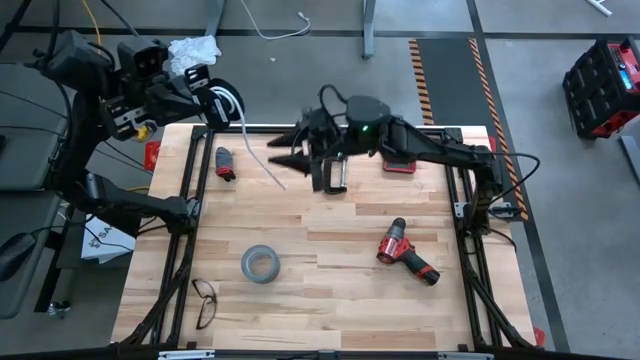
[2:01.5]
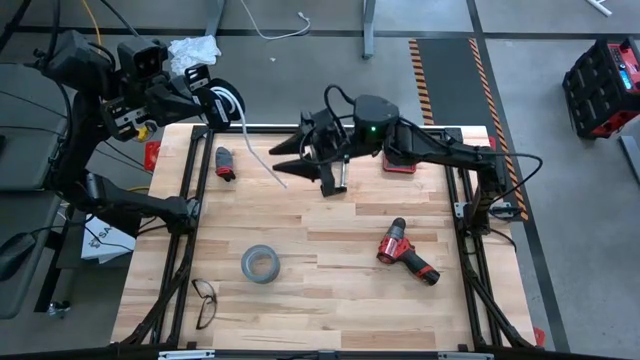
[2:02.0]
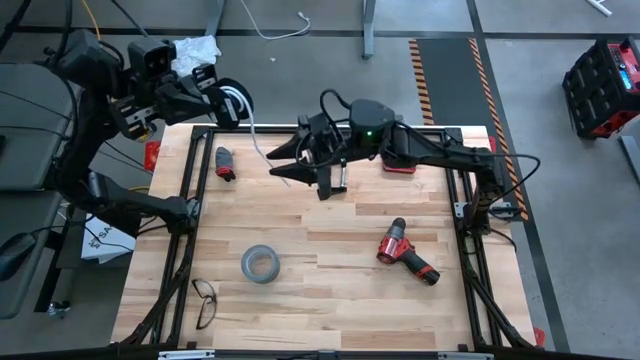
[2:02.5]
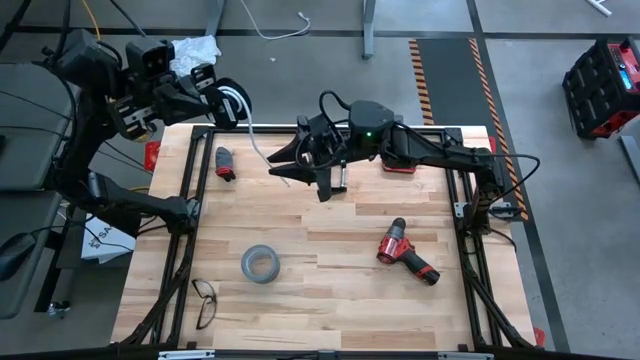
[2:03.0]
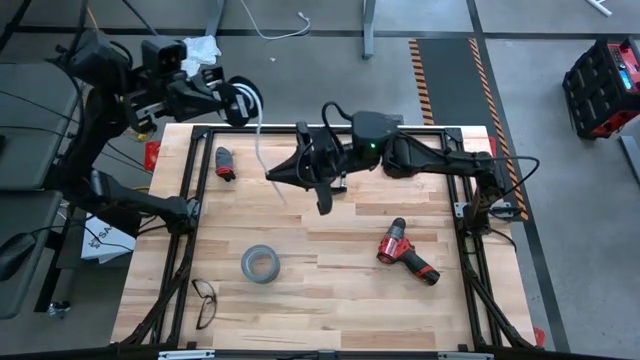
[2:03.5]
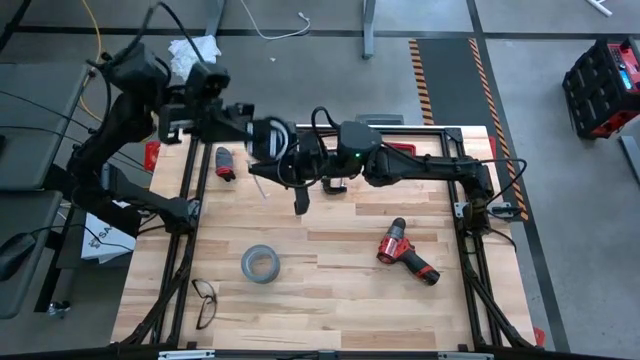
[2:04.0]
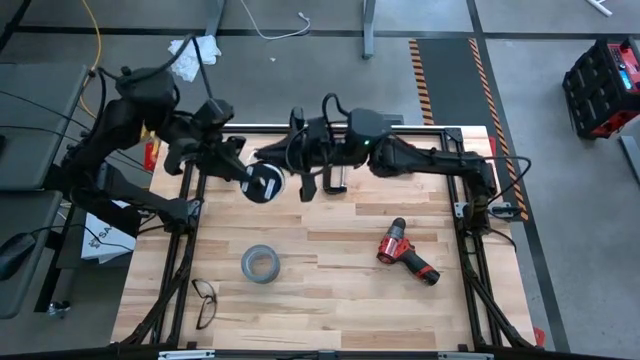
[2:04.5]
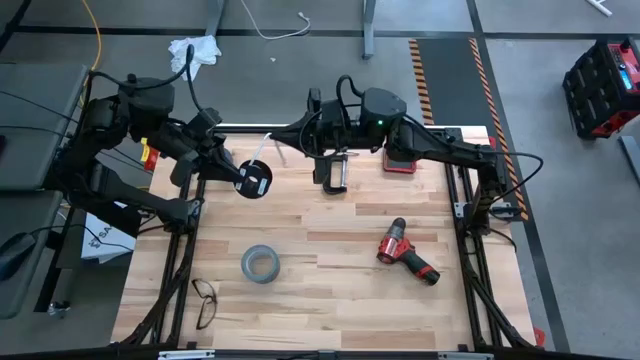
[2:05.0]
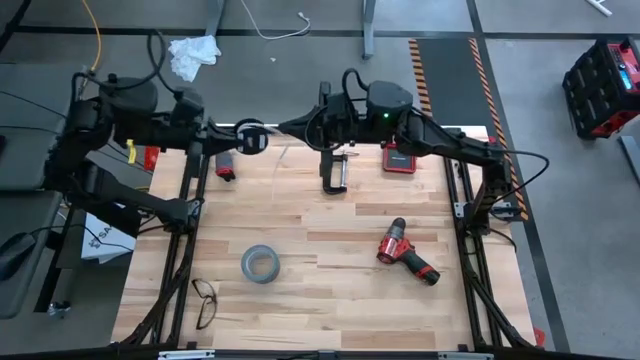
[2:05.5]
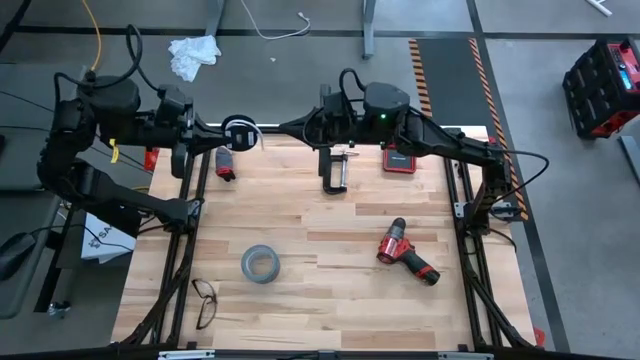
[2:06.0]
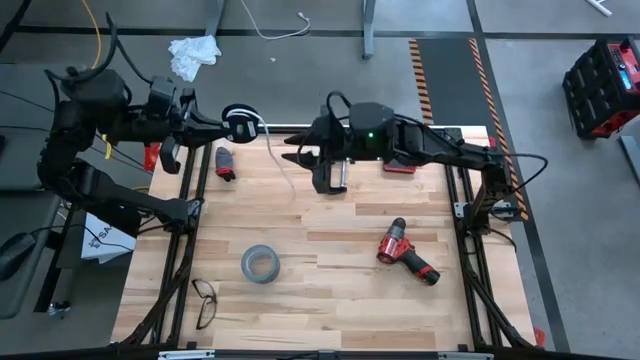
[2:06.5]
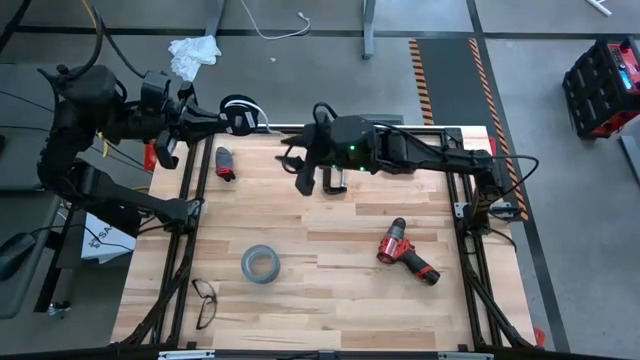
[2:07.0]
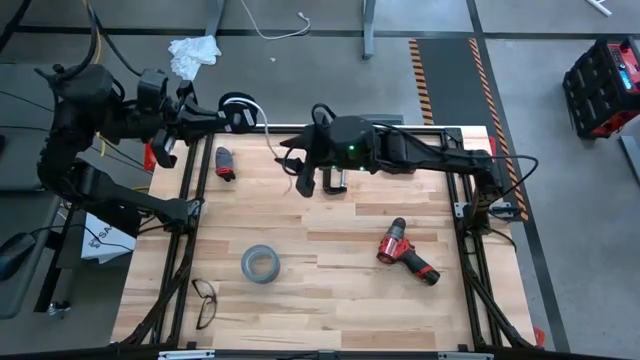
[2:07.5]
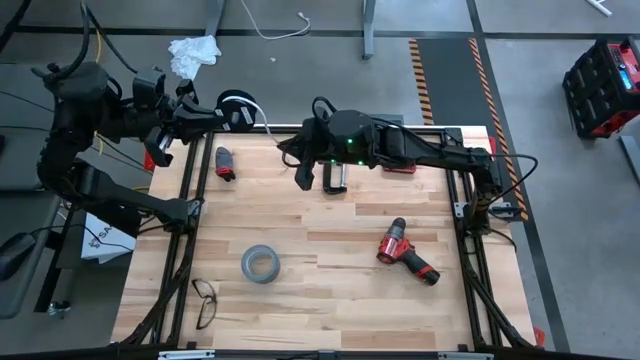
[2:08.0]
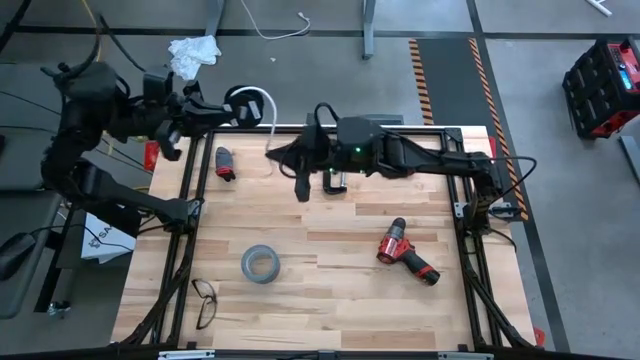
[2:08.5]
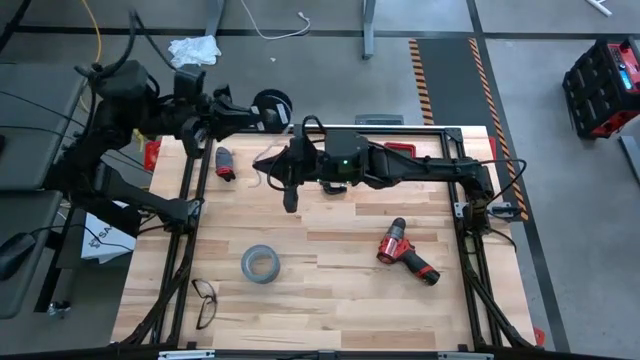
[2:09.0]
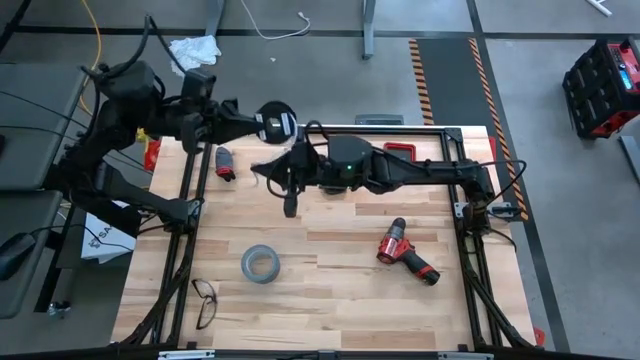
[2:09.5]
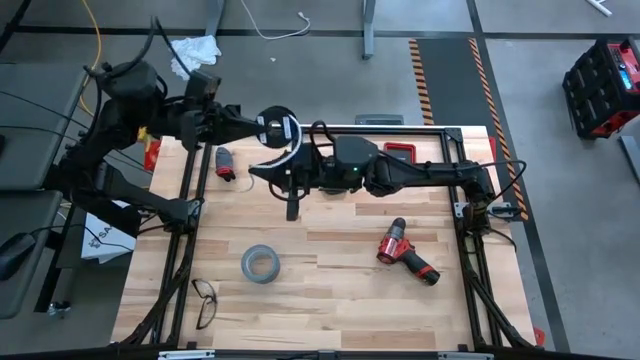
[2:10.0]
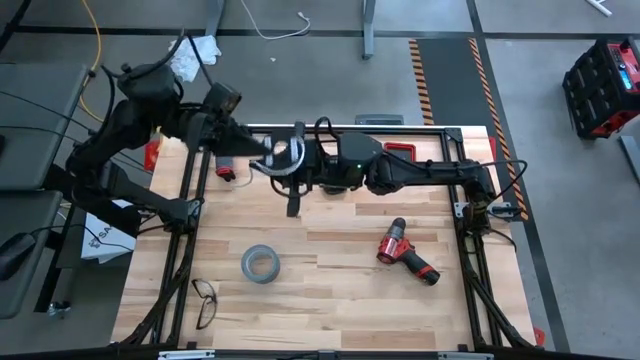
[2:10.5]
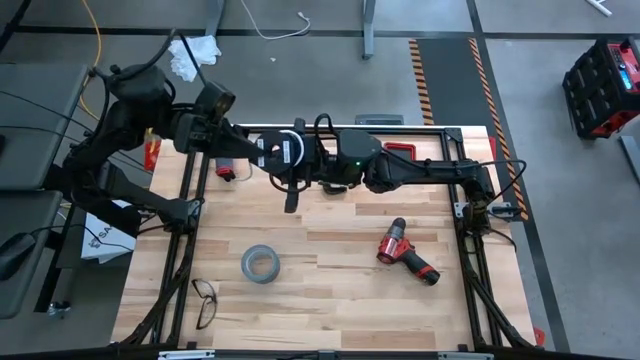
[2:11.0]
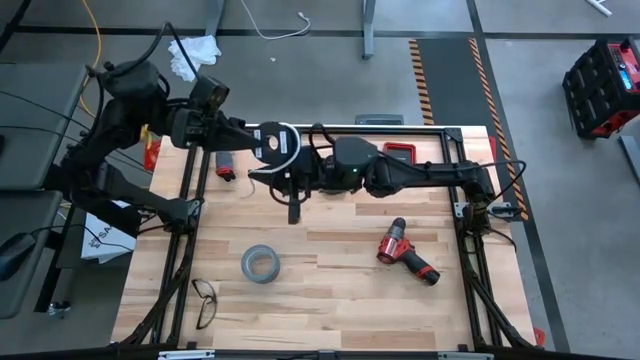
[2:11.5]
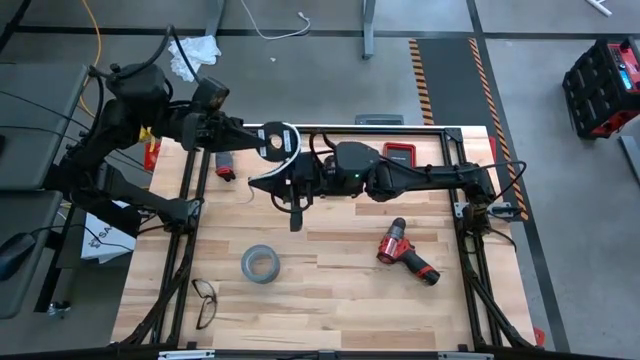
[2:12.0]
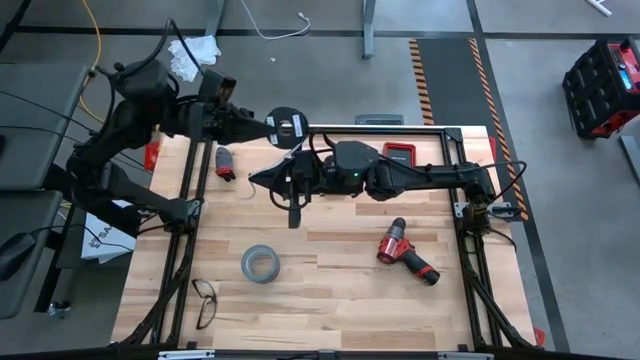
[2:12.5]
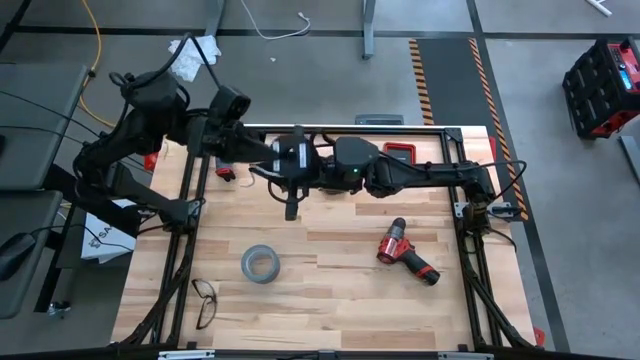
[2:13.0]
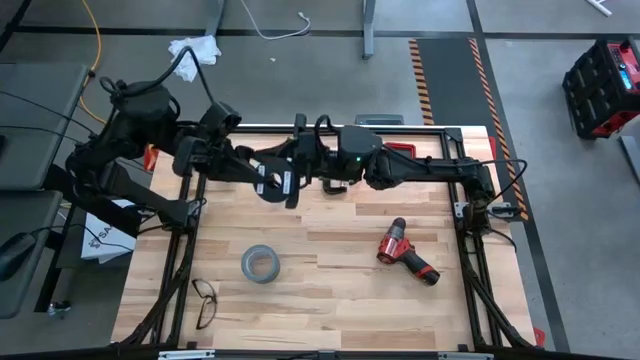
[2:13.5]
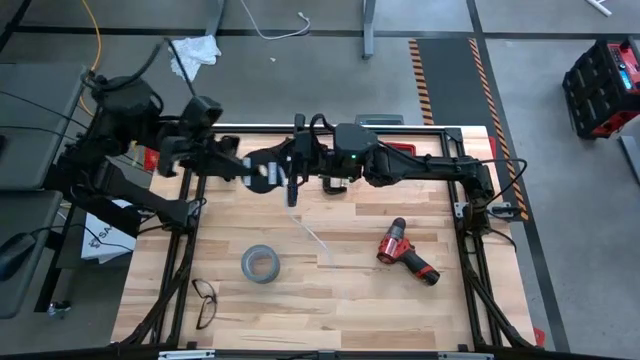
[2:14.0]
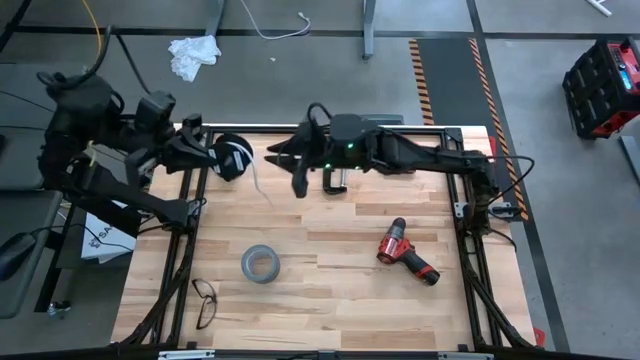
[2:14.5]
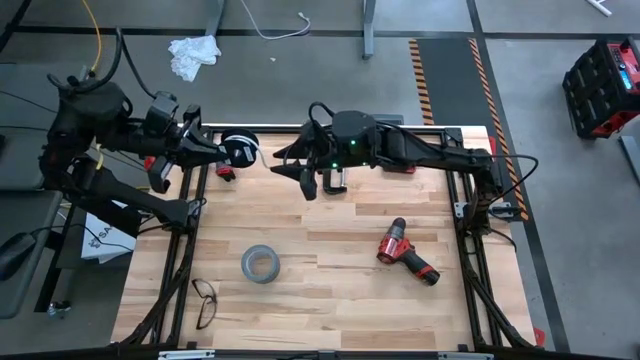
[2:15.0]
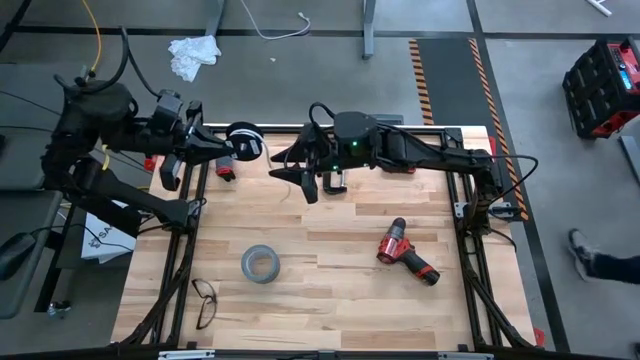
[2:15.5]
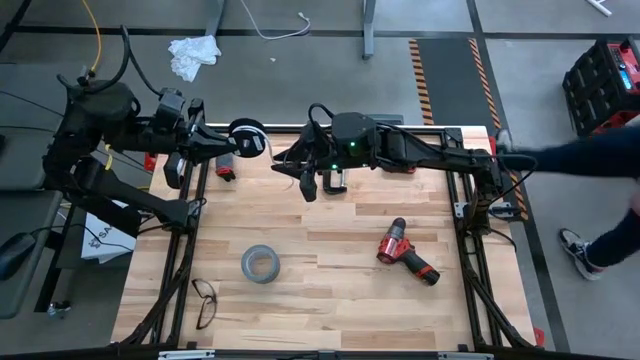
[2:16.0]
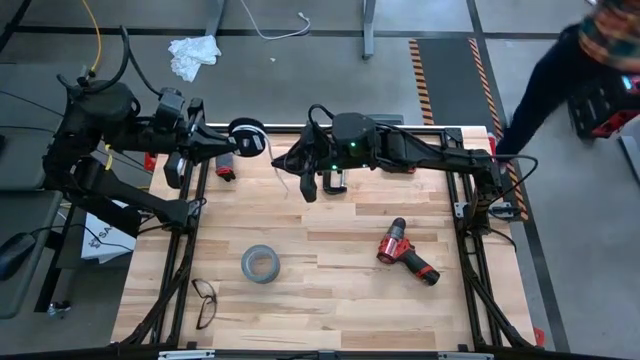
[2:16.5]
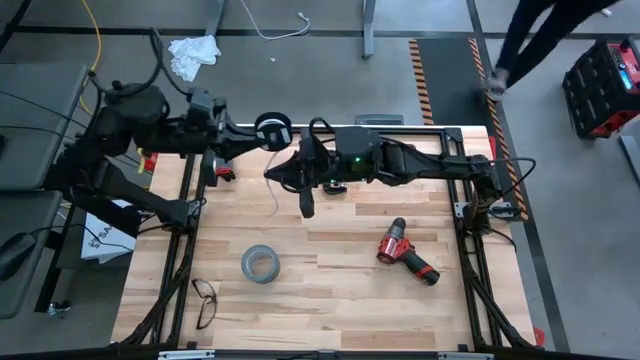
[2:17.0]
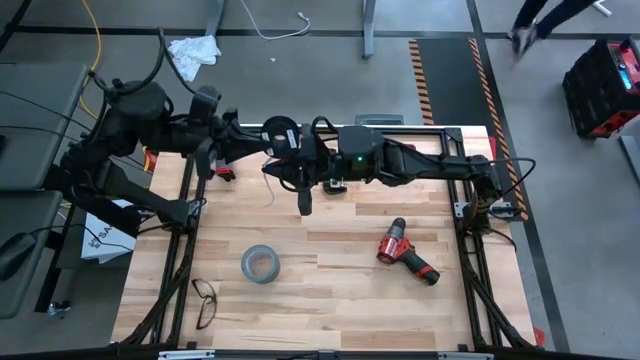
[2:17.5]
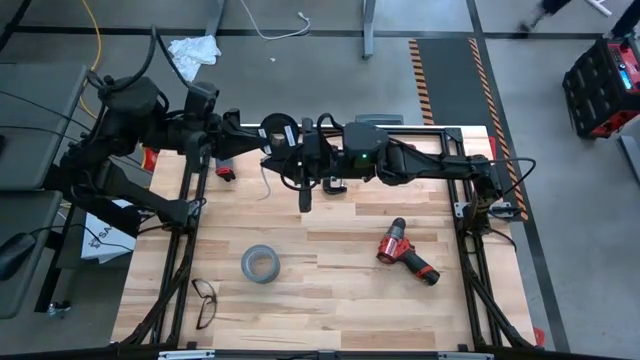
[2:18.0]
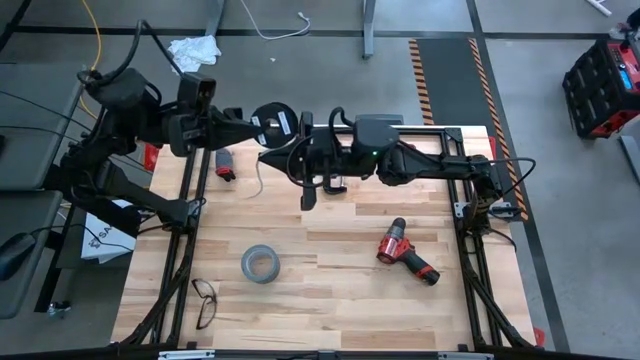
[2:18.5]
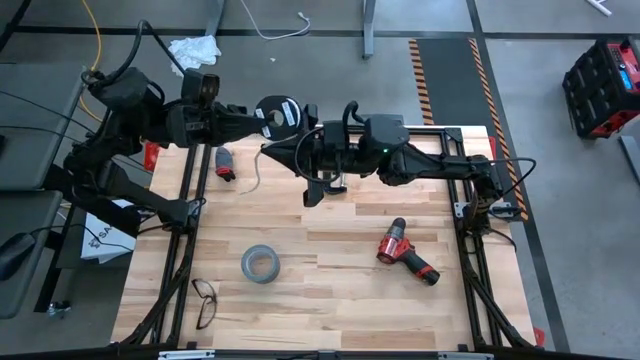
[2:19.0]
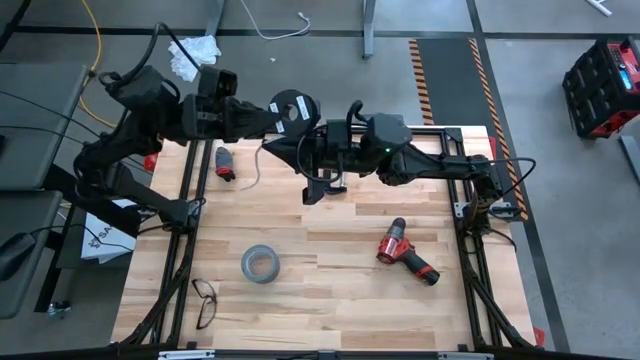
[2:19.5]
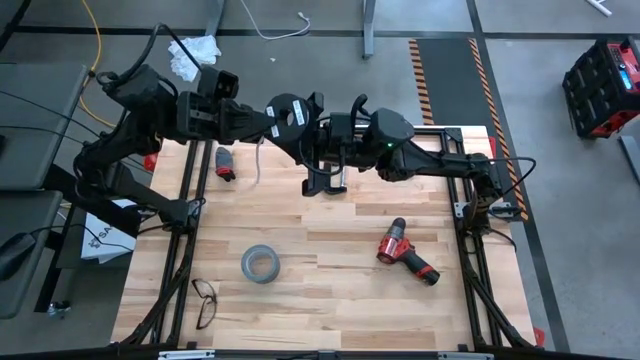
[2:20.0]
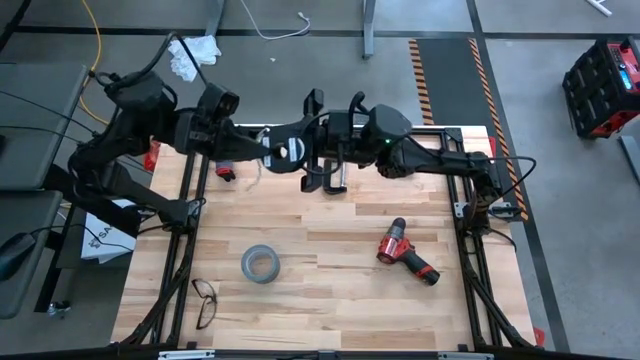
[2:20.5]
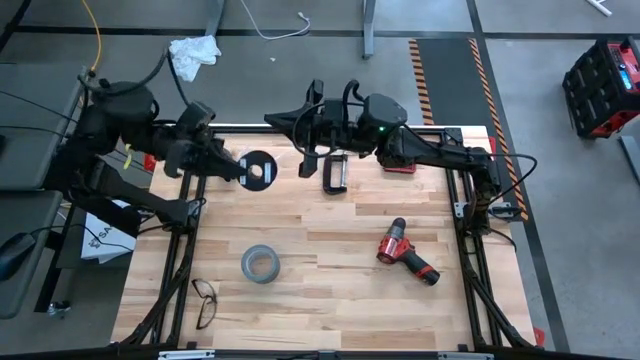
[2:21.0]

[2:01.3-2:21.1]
Task: Coil cords
Coil the white wire
